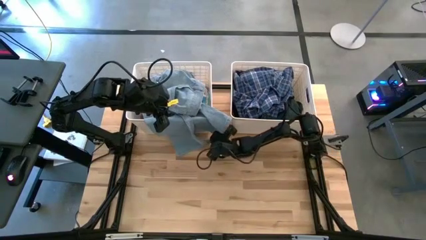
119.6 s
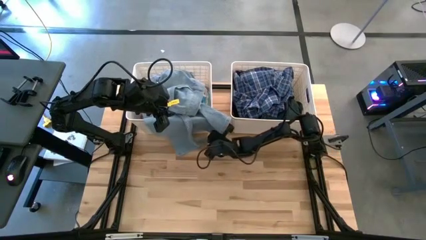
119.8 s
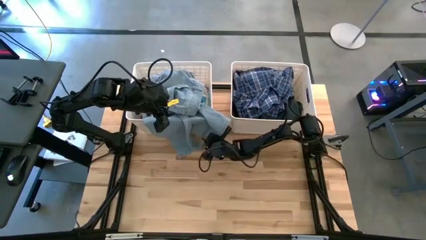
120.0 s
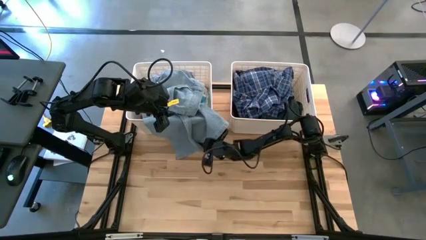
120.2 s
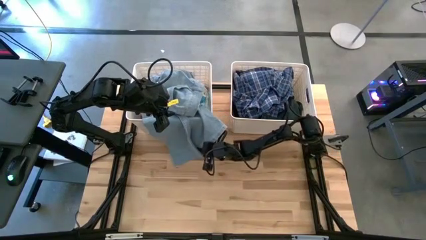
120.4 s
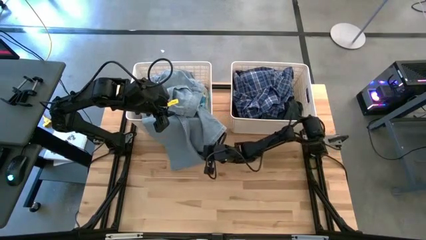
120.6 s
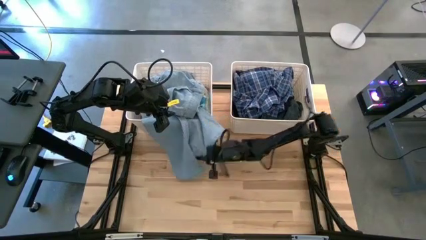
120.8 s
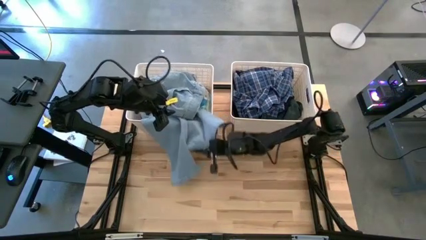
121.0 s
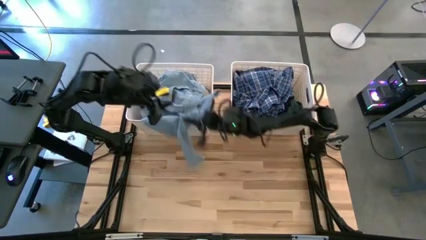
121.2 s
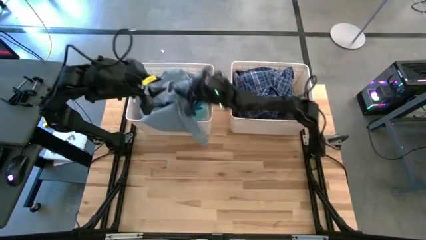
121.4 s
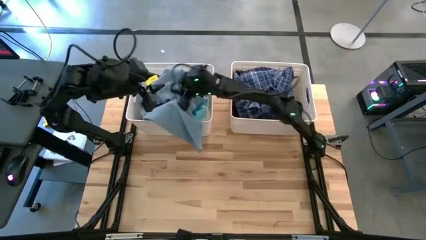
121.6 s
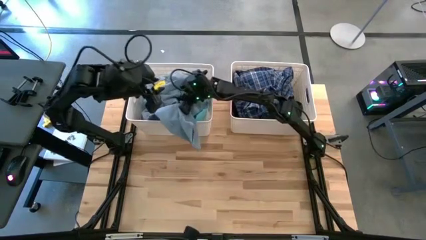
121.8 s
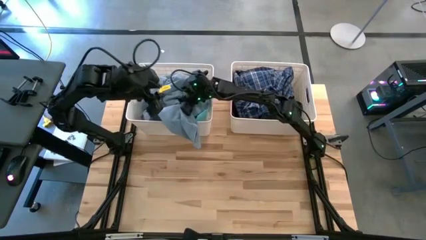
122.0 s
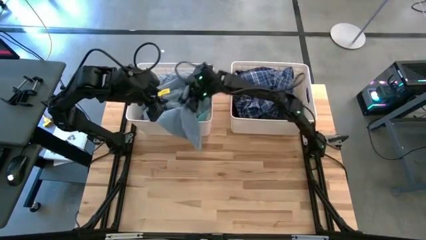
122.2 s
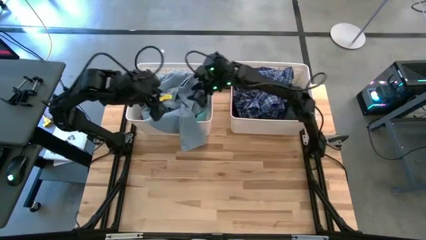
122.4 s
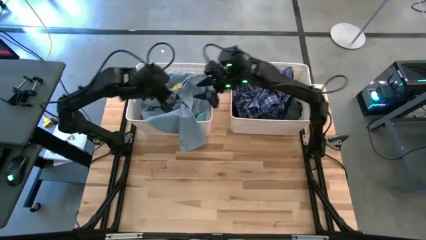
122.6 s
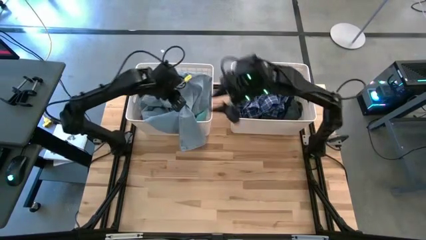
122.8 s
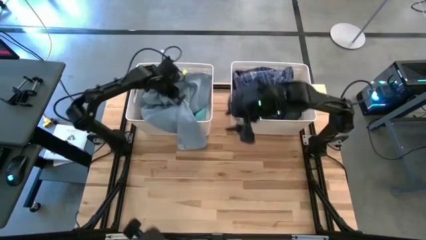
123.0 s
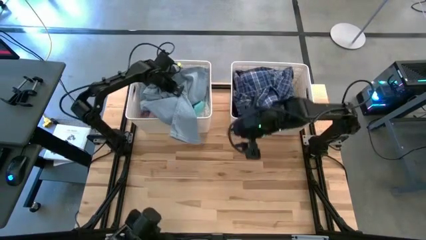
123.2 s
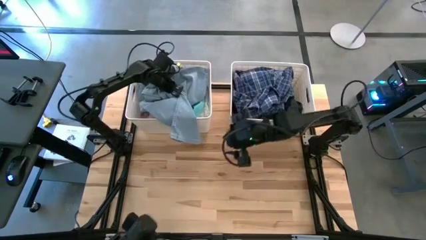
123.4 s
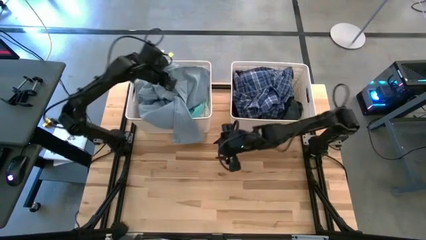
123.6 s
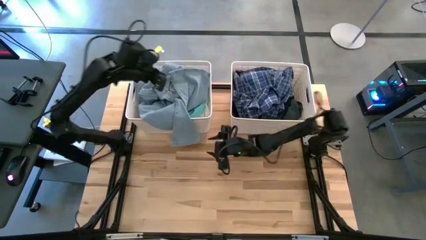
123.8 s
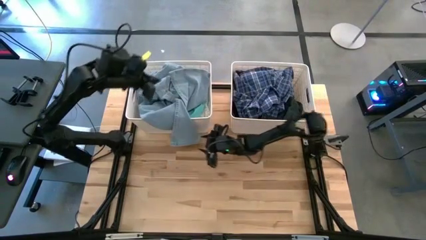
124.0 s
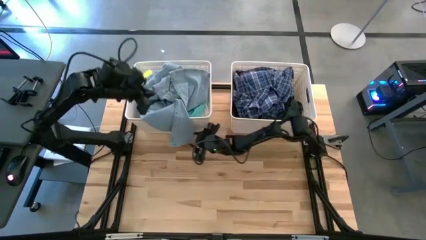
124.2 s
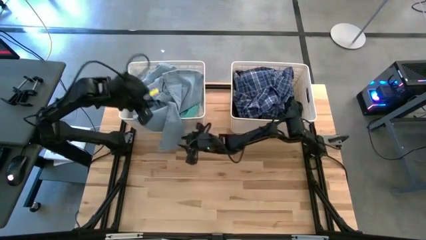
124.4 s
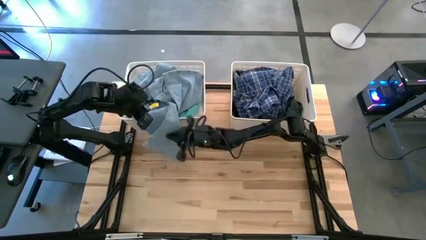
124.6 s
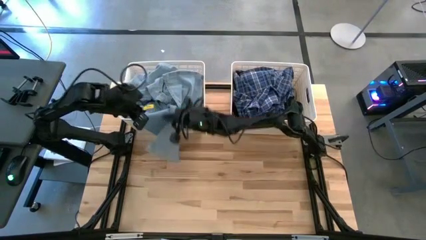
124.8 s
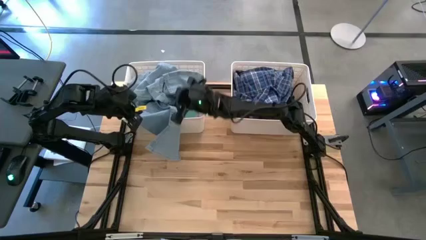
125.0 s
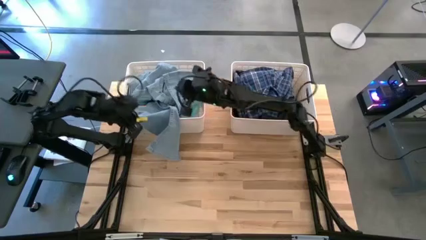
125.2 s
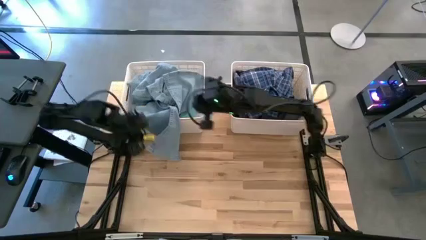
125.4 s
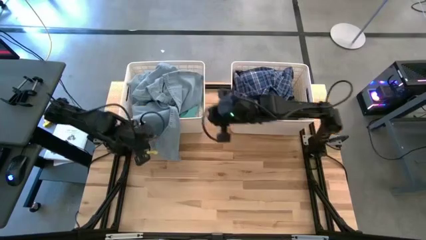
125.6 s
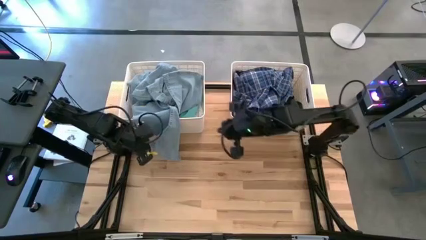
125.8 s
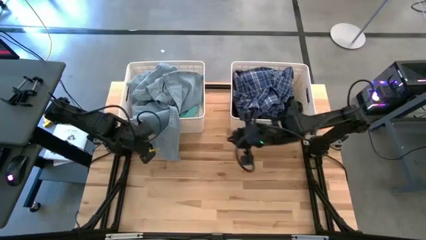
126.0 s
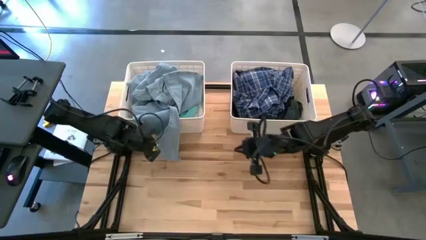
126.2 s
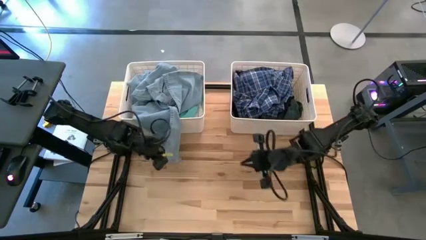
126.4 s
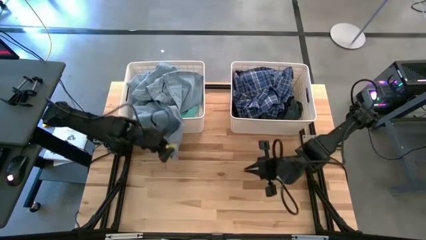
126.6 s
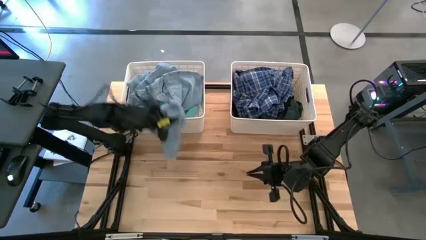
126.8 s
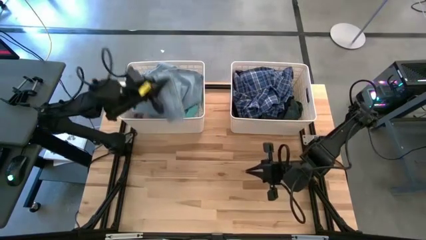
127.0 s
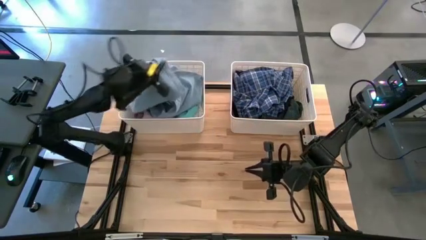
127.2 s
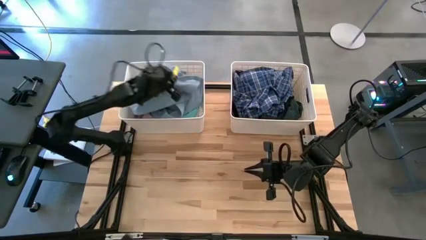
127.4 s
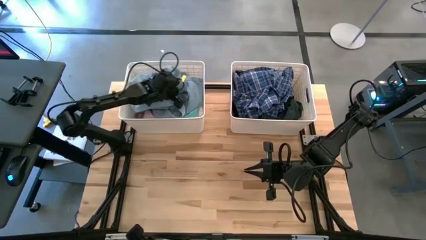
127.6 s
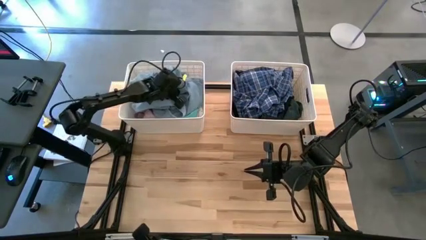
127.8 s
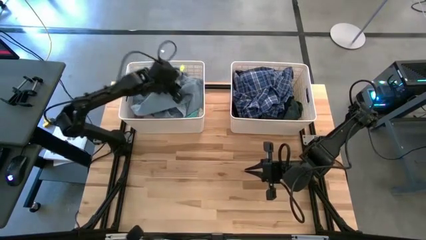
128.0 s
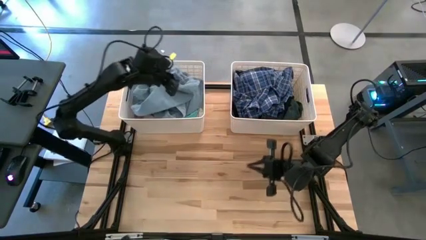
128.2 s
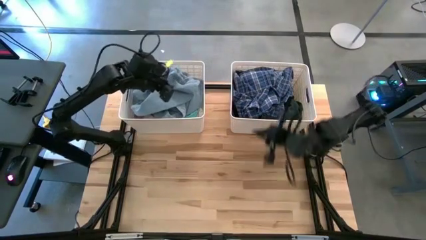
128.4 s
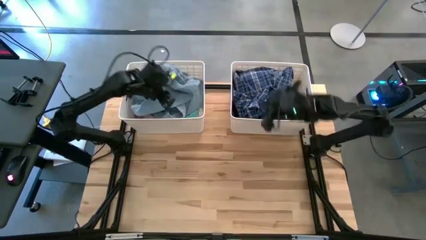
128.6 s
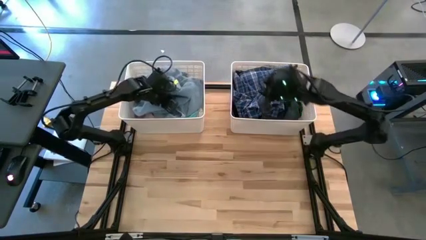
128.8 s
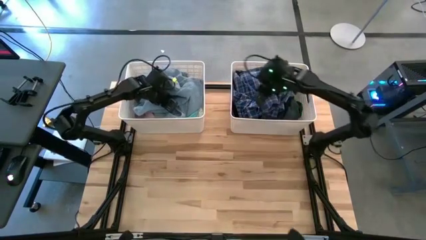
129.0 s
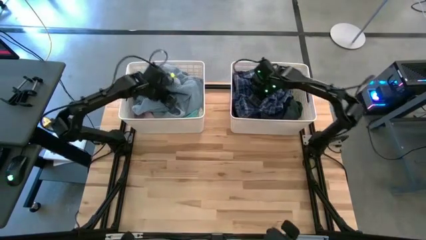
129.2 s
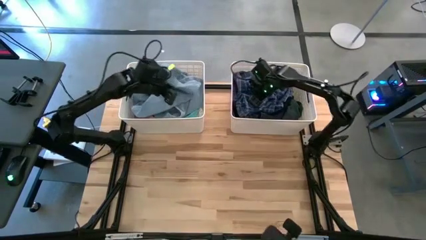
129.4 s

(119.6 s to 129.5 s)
Task: Sort clothes
Put the light blue denim pants into the left white bin

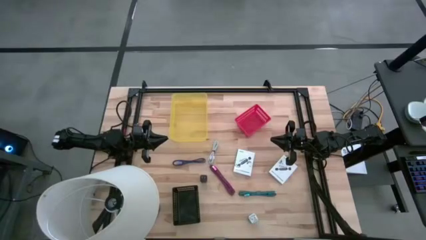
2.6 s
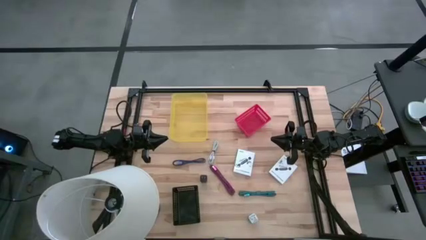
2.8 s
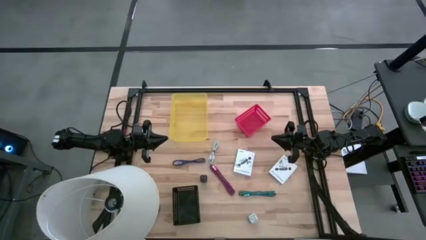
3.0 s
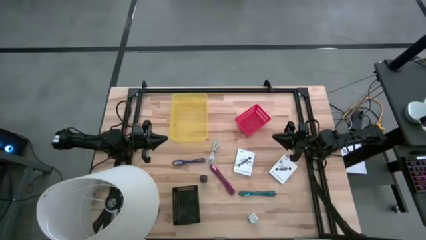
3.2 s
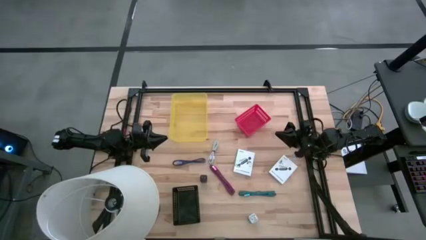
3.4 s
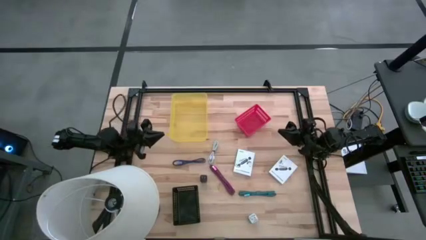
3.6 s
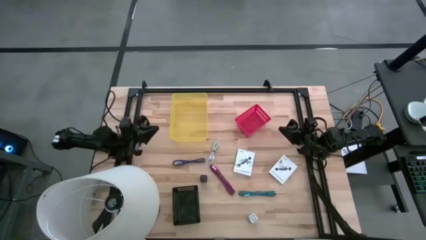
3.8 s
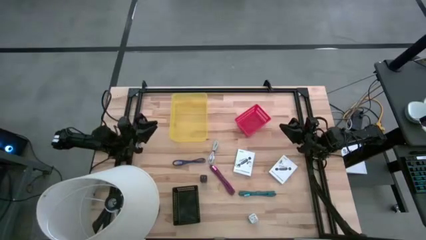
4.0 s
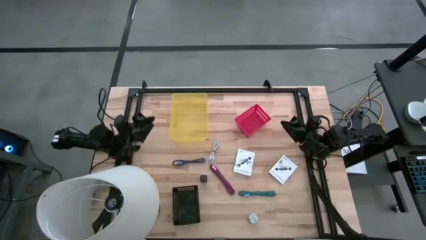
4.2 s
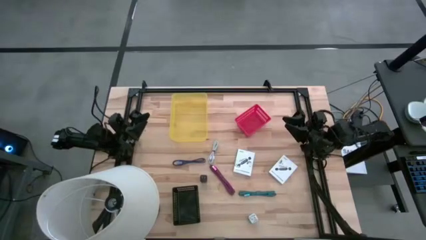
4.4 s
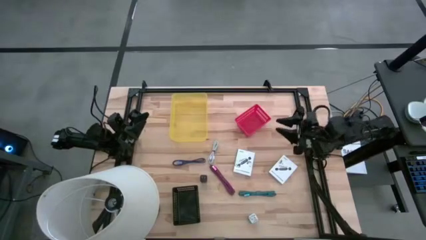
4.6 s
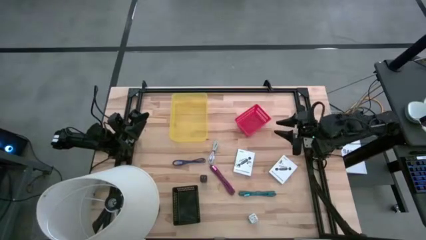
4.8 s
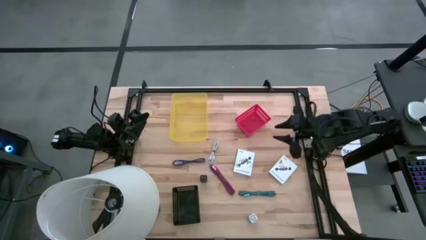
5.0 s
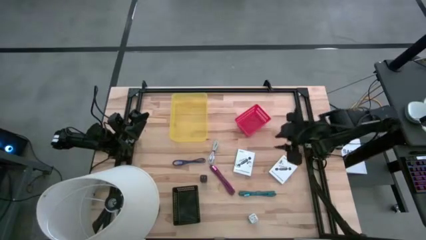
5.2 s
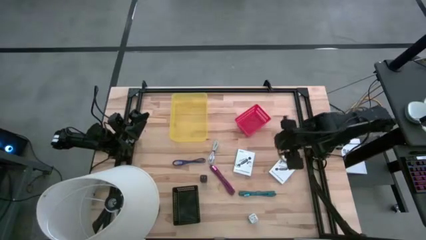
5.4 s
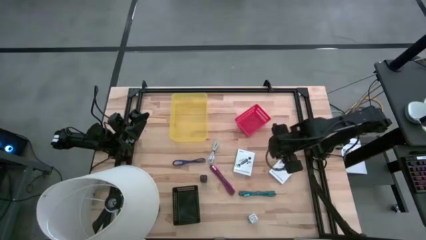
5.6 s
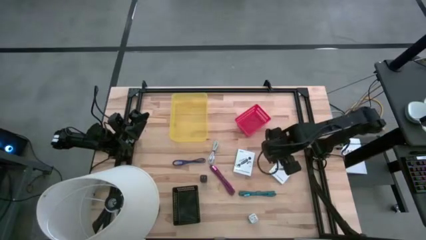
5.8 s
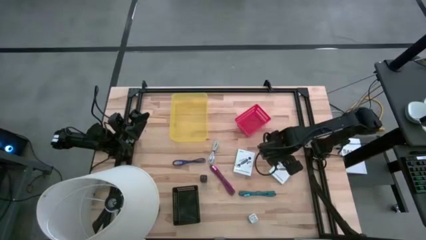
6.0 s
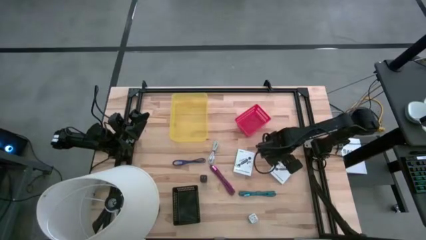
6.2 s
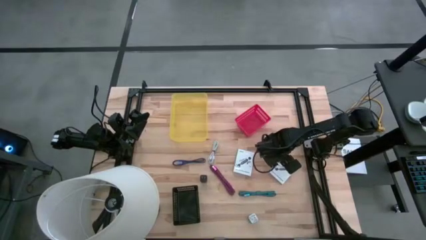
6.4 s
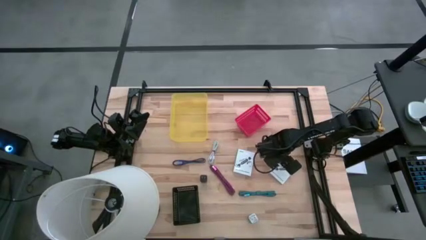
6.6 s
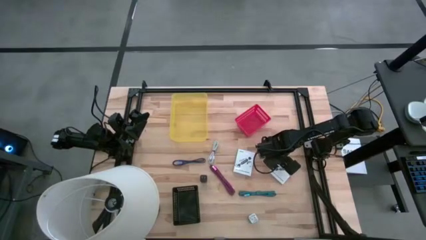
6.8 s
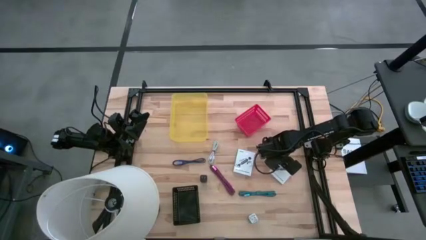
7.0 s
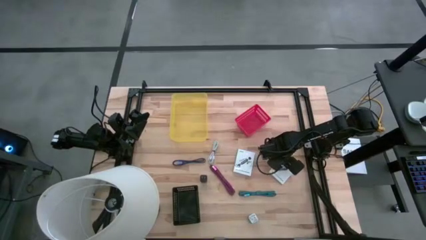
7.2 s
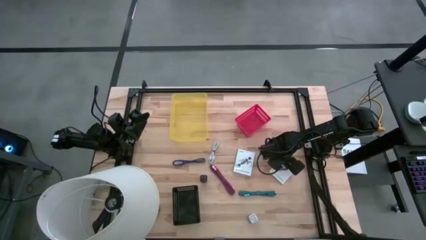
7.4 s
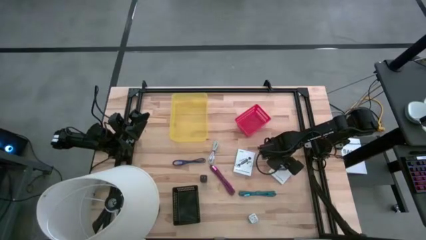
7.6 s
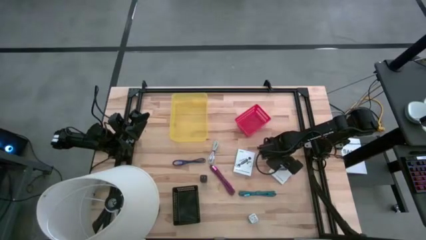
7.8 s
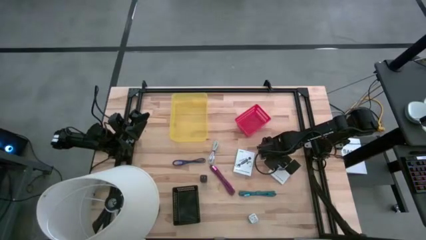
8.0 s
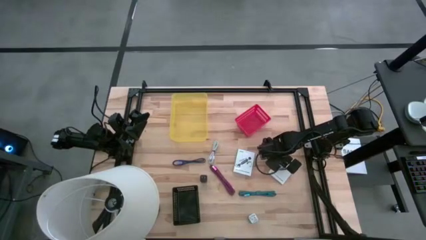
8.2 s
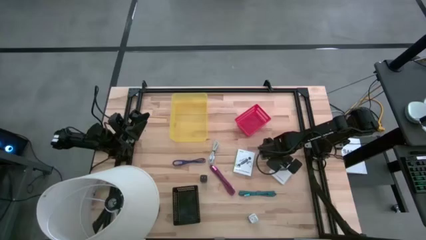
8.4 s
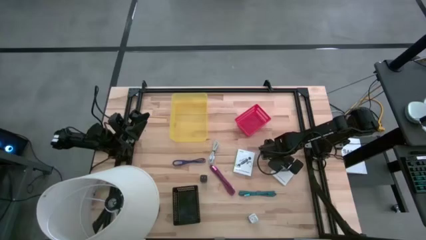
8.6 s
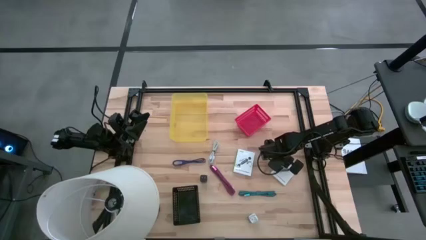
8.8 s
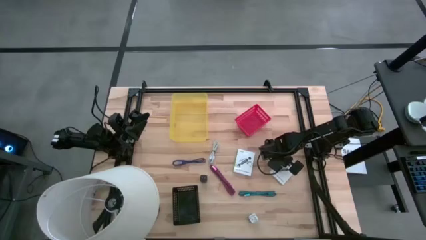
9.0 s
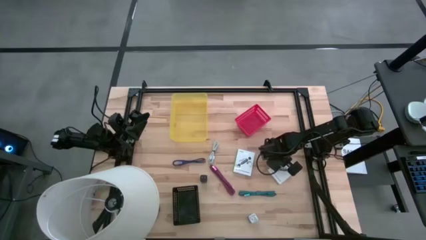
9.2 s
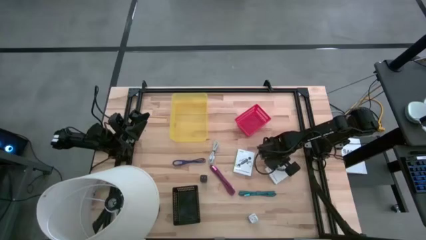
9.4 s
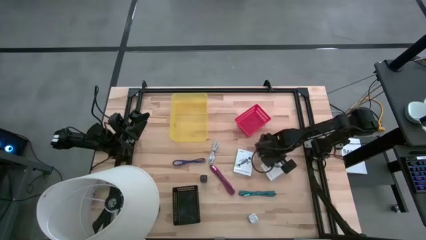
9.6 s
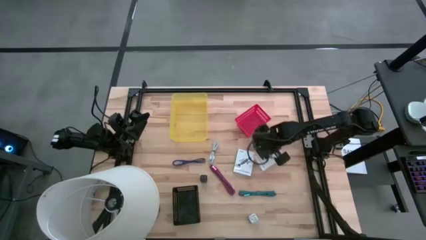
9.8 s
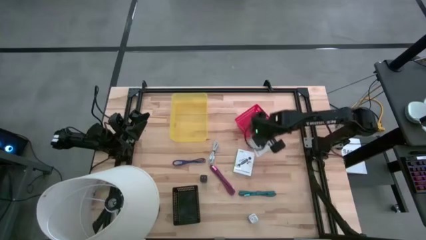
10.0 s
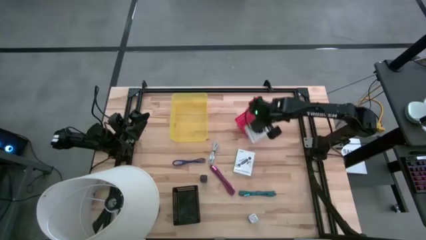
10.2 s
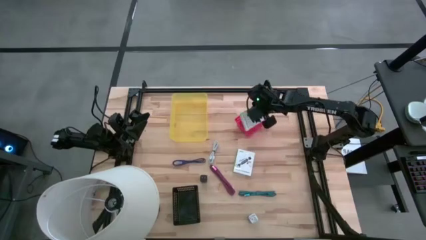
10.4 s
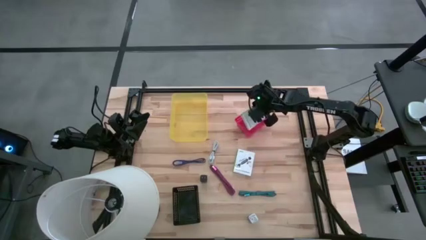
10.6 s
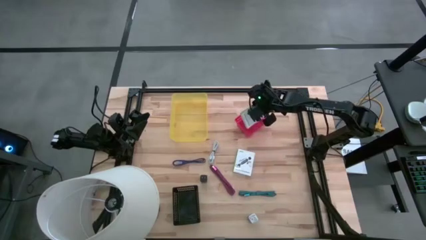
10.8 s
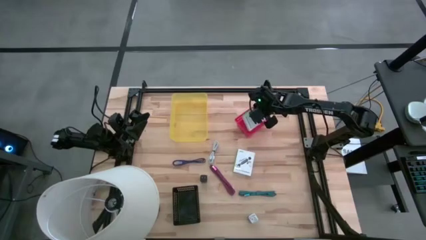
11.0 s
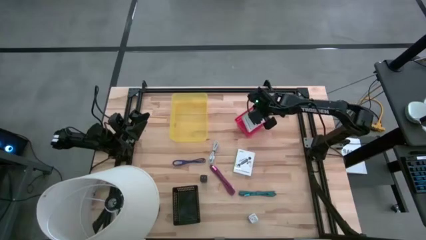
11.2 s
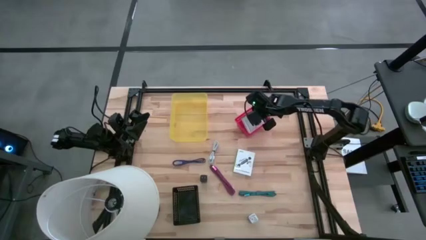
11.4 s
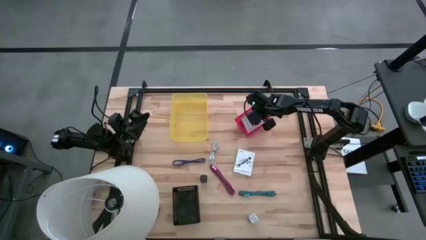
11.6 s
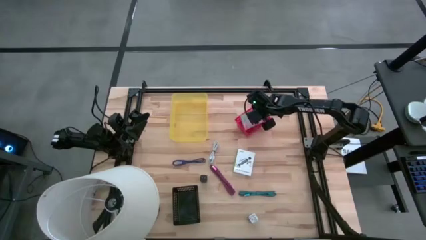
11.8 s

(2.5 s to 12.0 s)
Task: Pick and place items into bin
Put the right white box into the red bin
